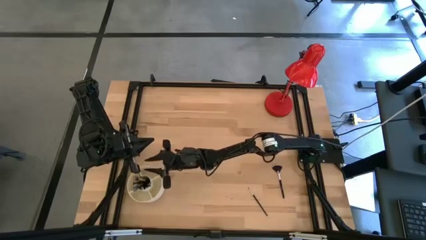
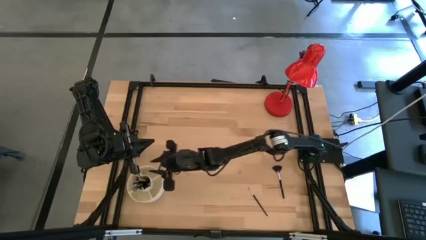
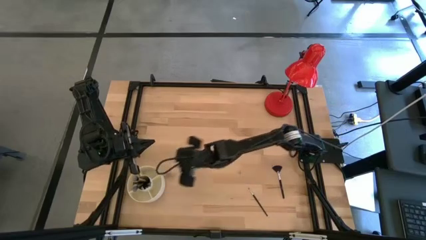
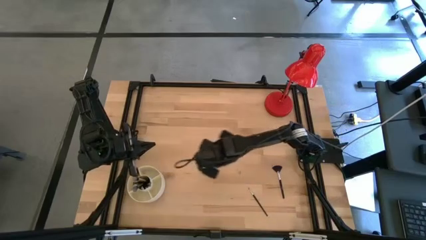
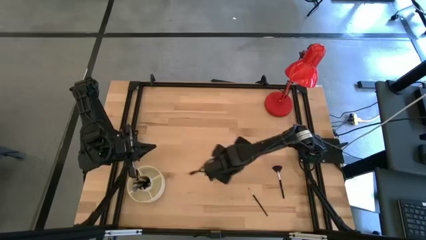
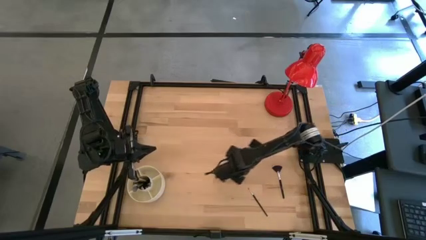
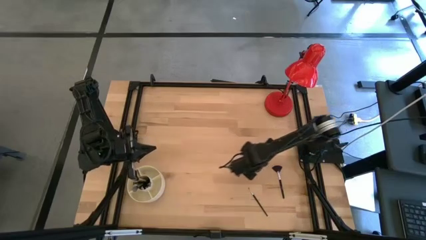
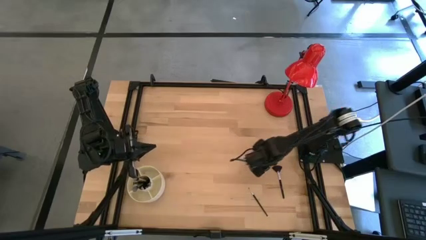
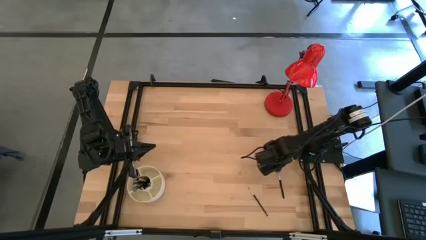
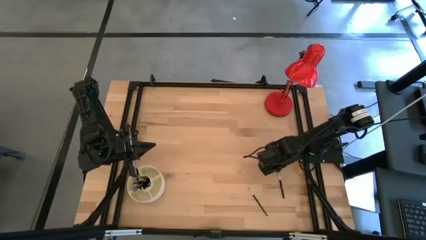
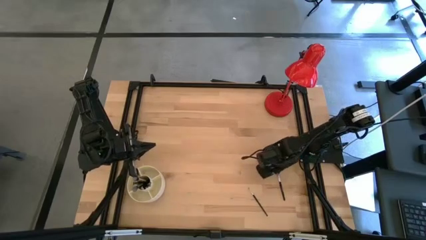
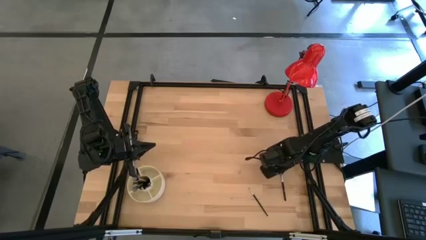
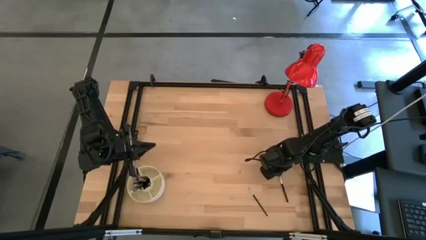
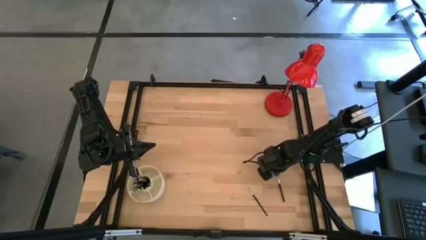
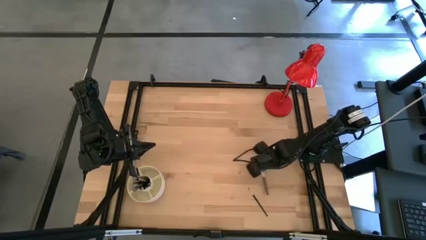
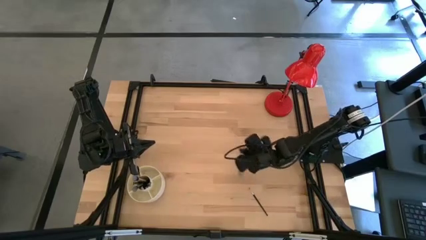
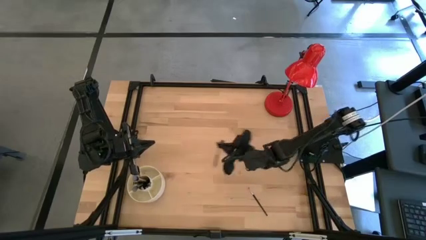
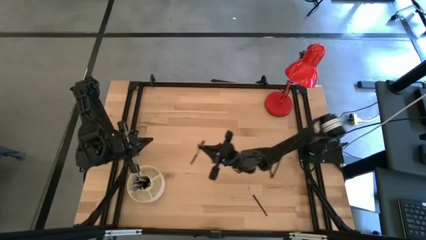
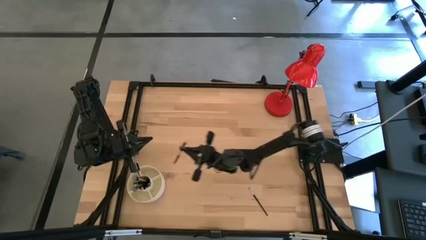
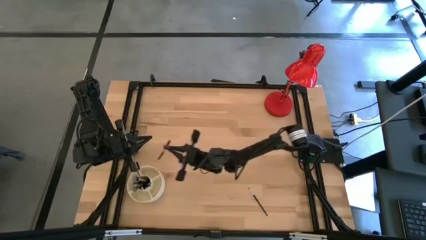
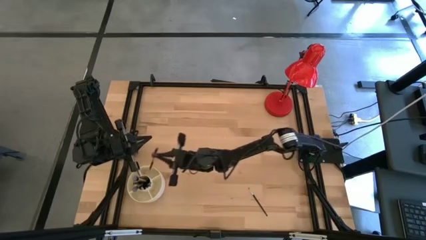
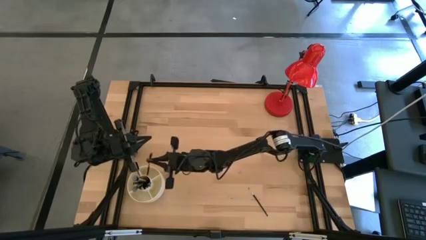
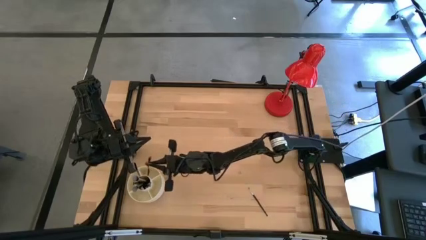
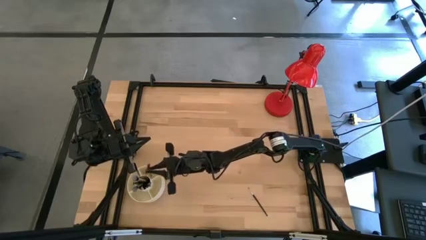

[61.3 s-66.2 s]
Task: Put items in baskets/containers
Put the black highlighter brush into the white organizer

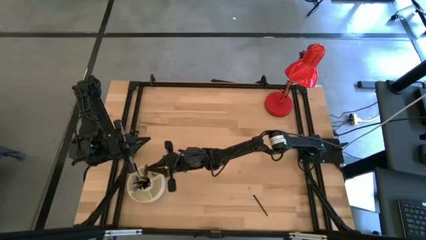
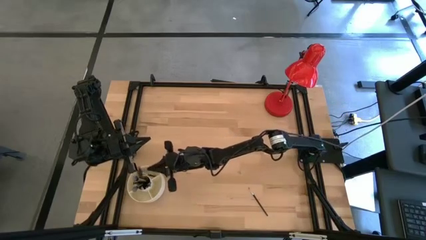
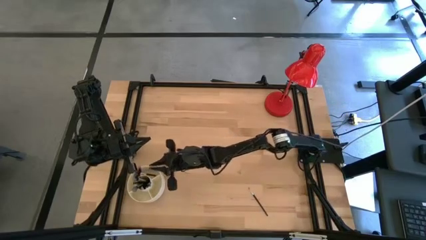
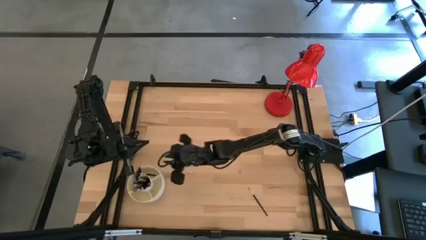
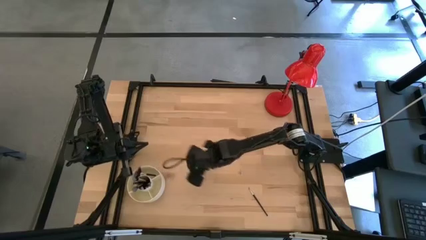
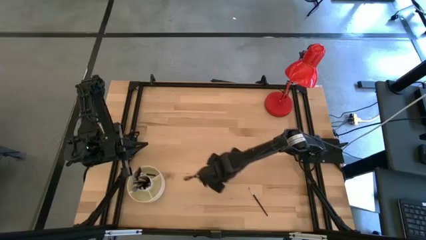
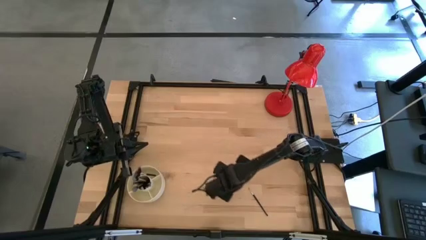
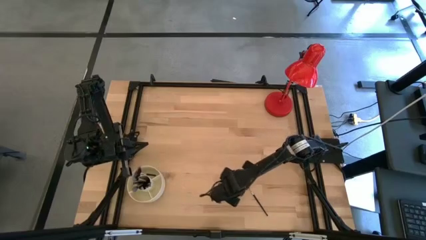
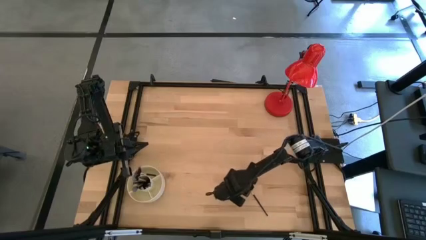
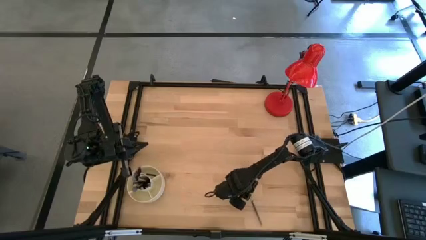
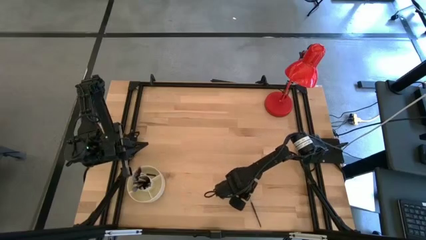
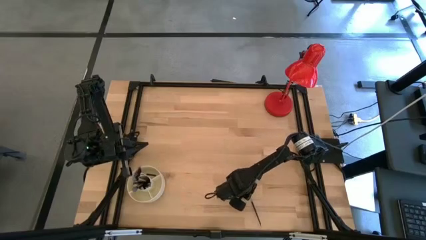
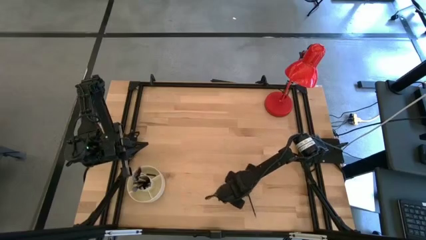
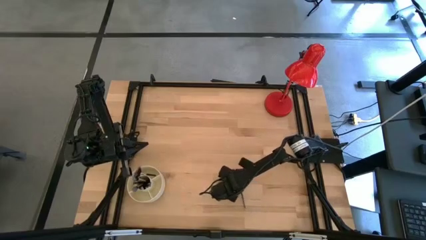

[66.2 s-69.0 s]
Put the black eyeshadow brush into the white organizer

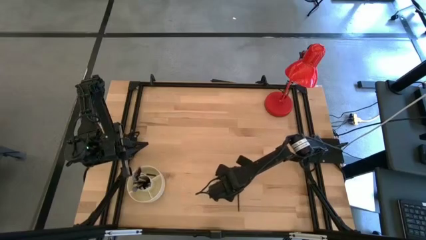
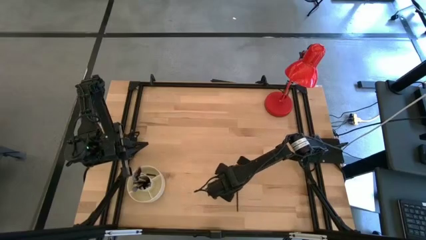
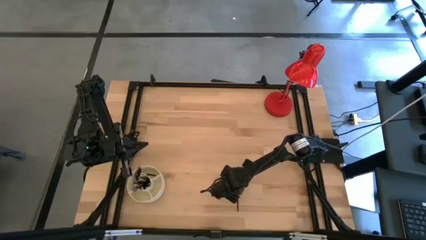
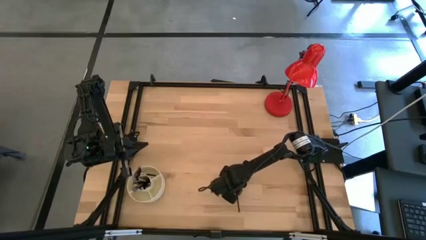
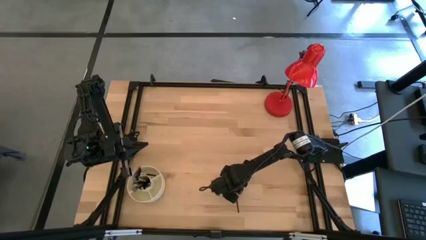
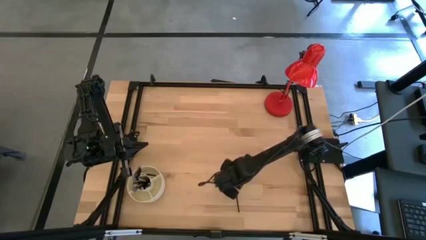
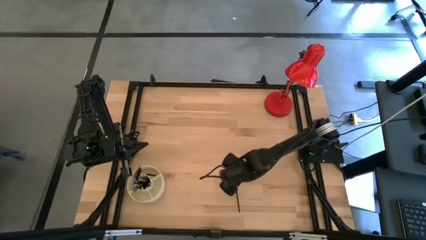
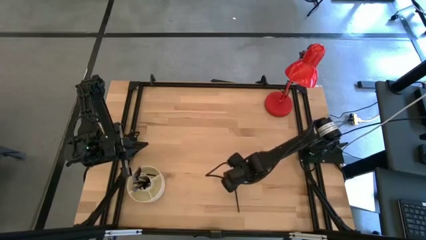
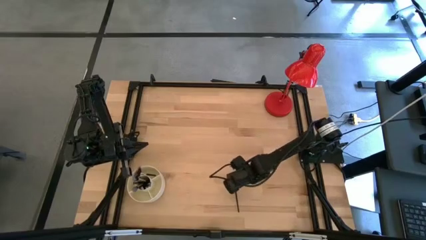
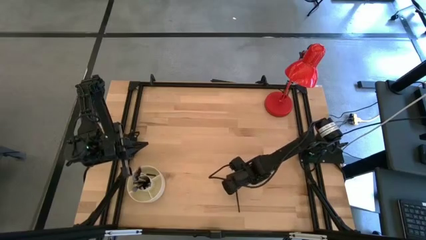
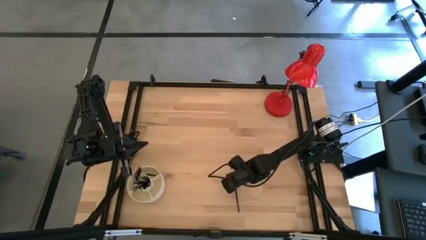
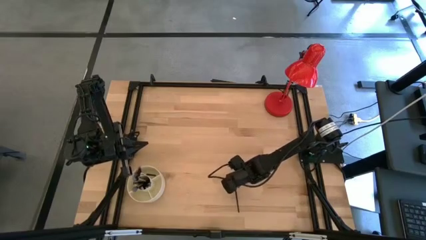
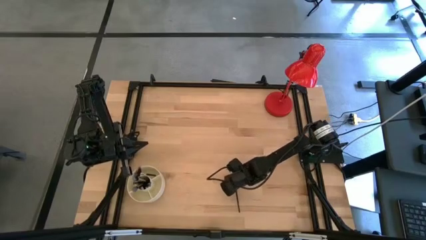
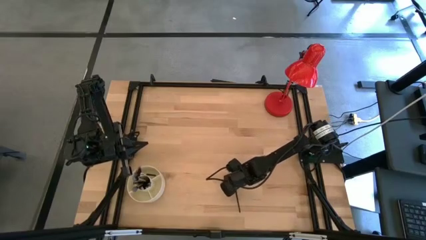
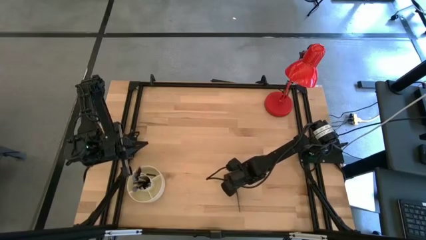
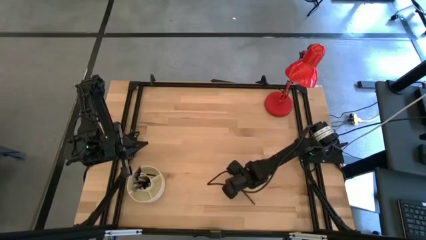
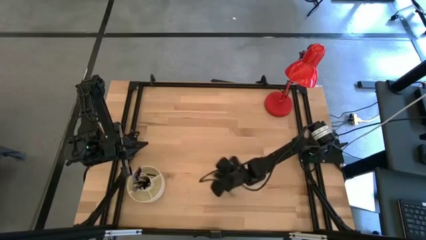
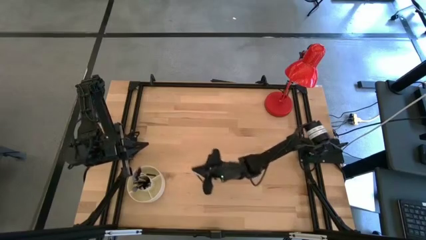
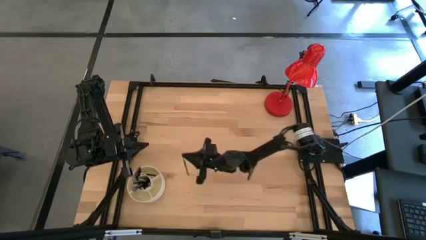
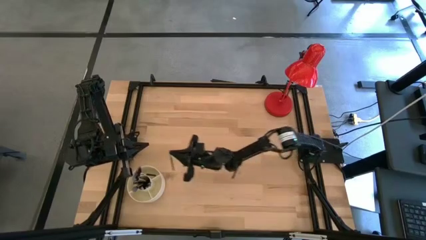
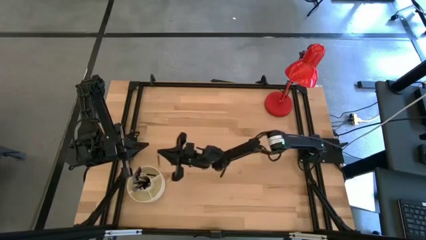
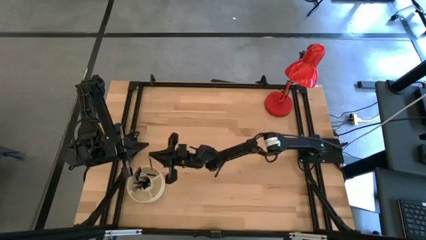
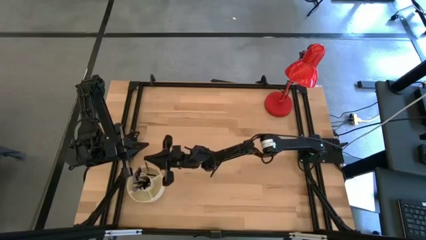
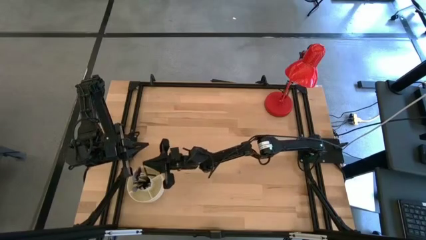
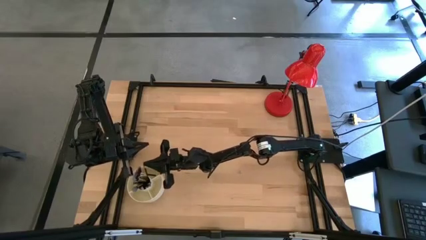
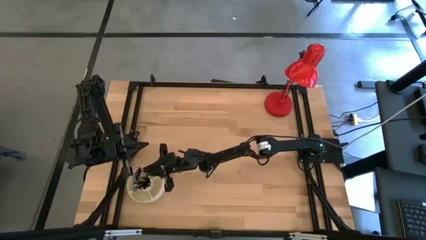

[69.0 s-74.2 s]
Put the black eyeshadow brush into the white organizer

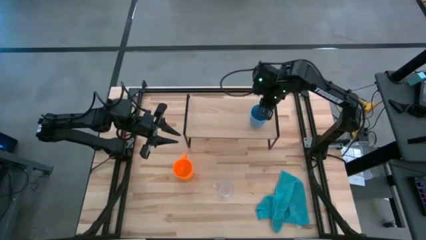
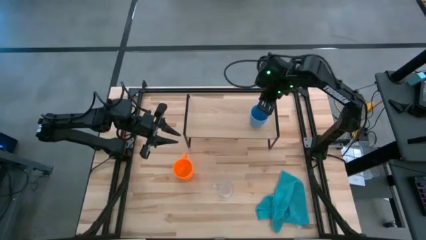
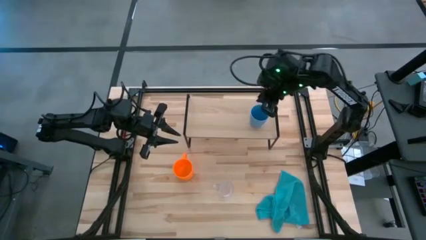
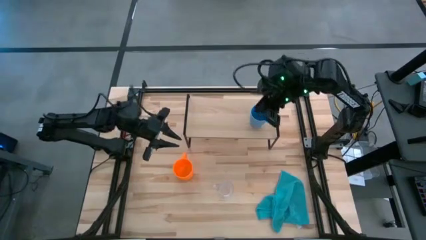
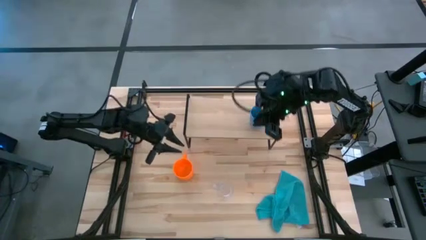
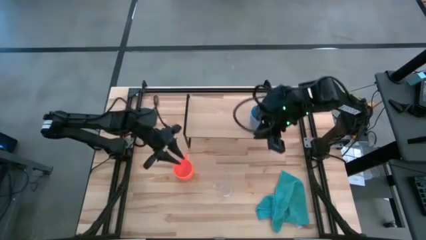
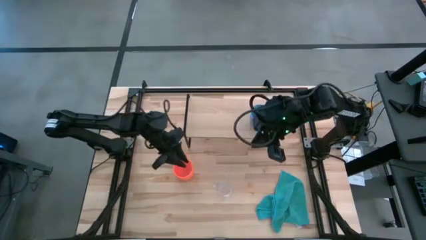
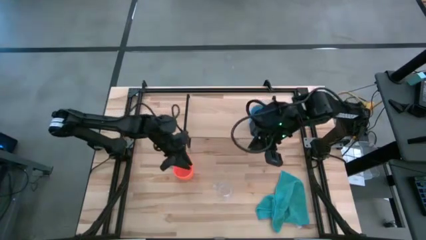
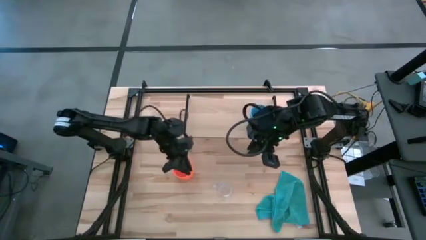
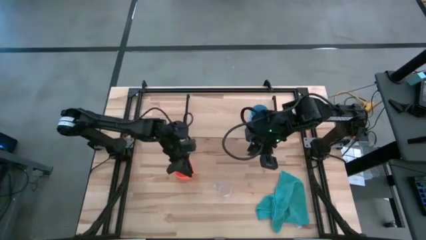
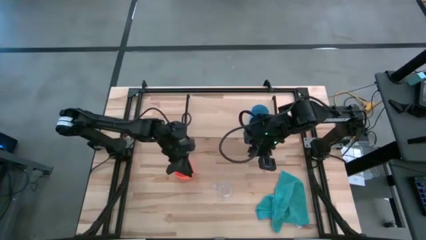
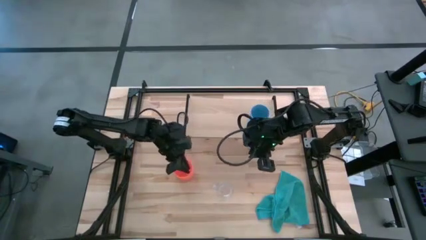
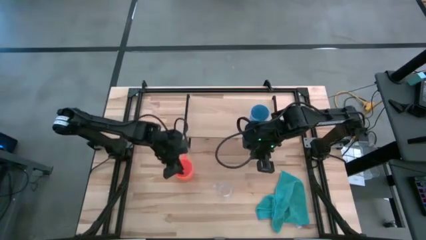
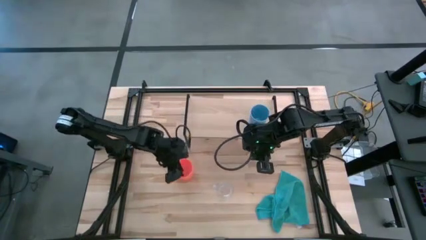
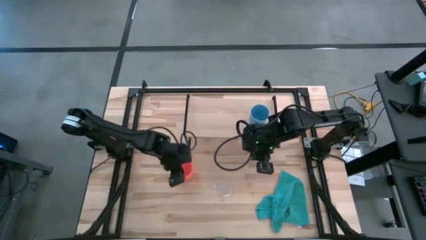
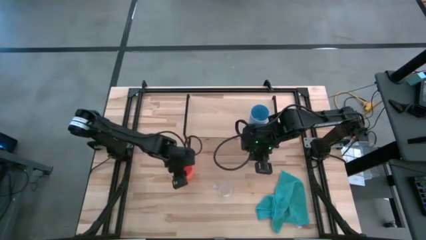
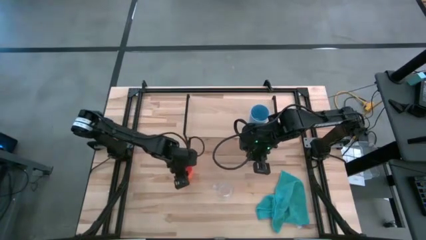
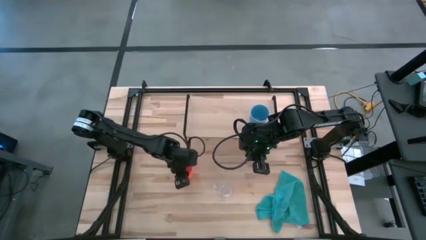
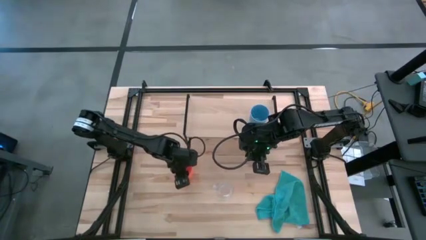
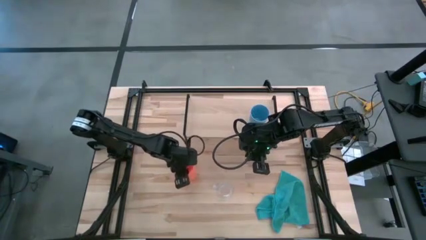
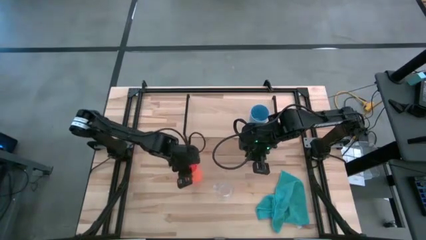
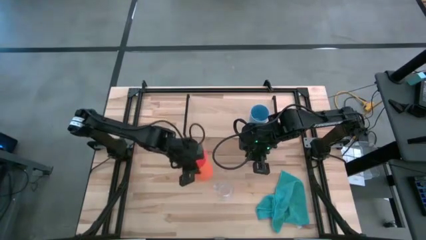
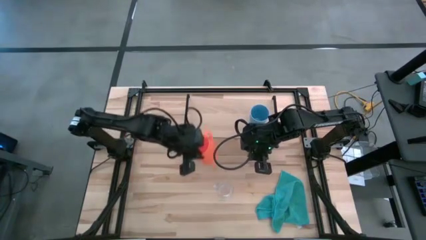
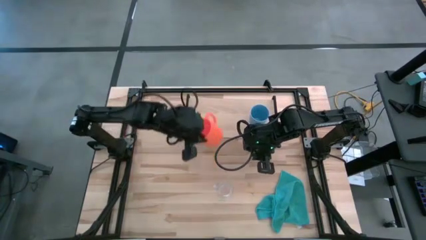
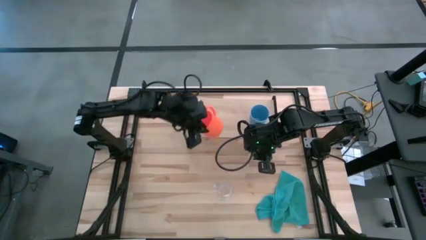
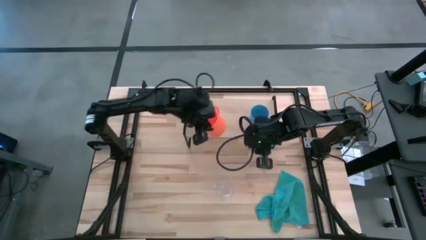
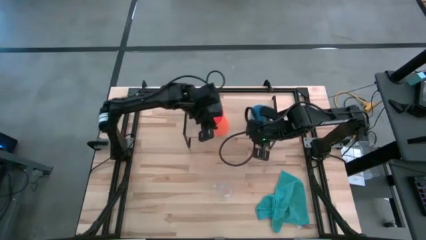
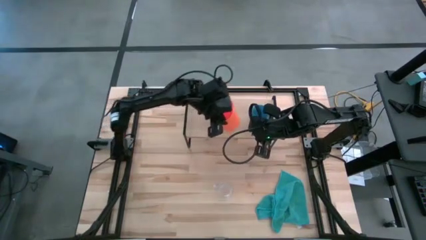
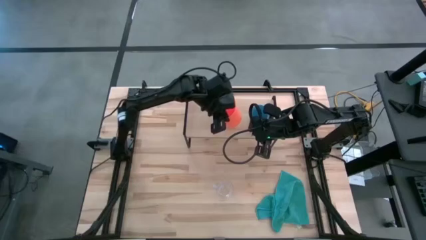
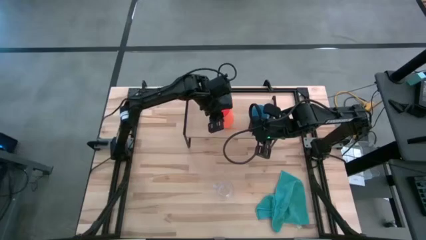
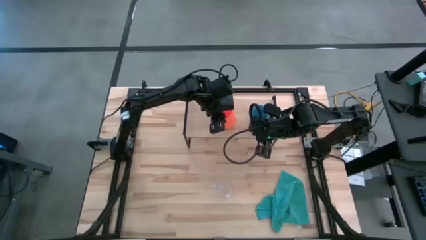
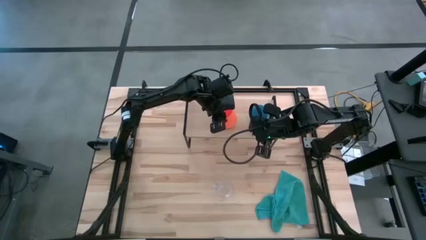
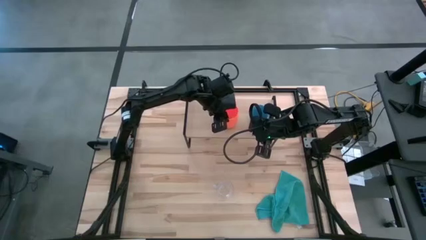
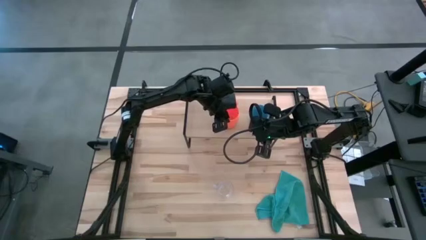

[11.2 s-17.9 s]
Task: Stack small to large cups/mugs on shelf
Put the orange mug on the shelf
